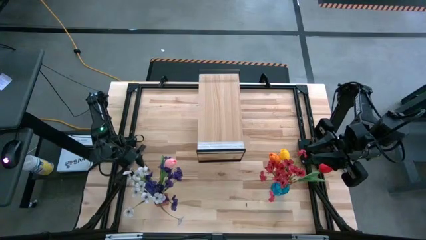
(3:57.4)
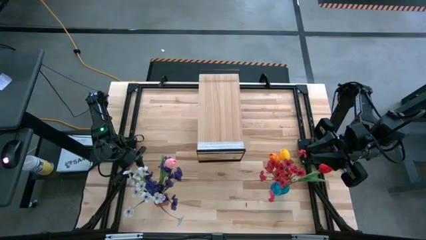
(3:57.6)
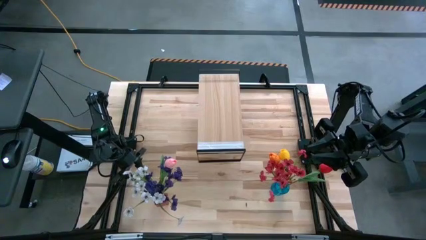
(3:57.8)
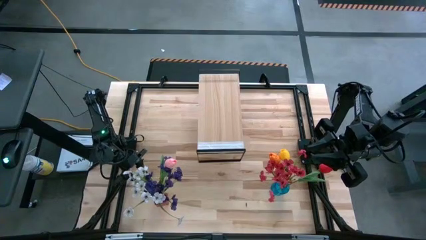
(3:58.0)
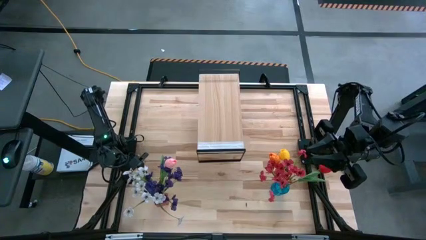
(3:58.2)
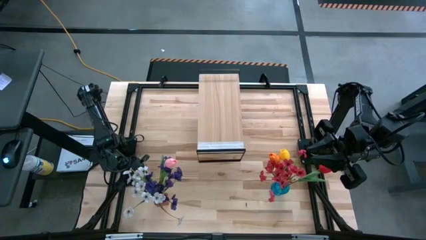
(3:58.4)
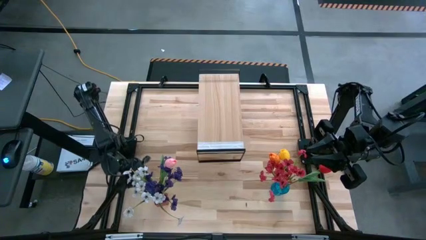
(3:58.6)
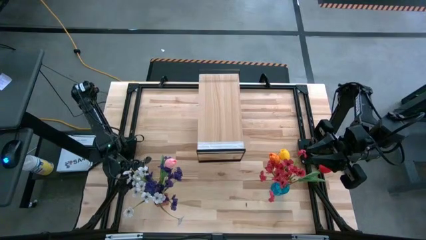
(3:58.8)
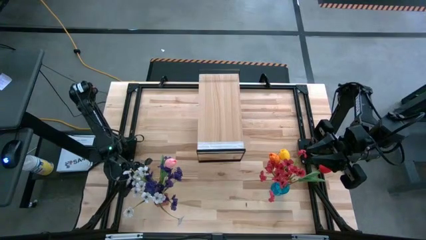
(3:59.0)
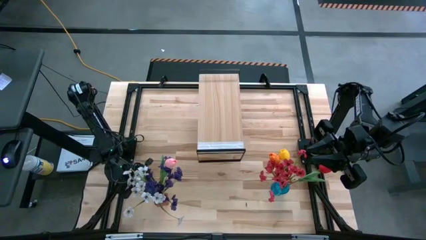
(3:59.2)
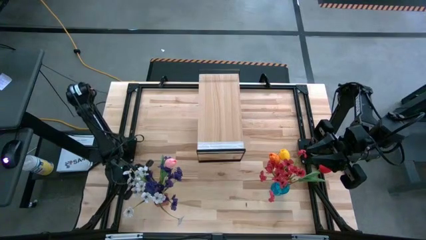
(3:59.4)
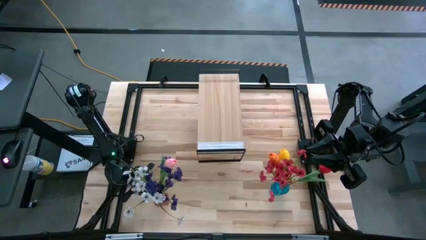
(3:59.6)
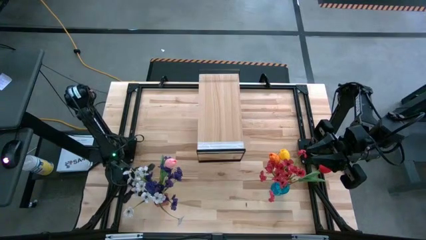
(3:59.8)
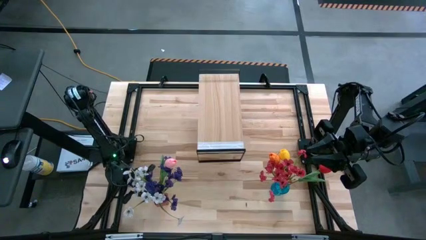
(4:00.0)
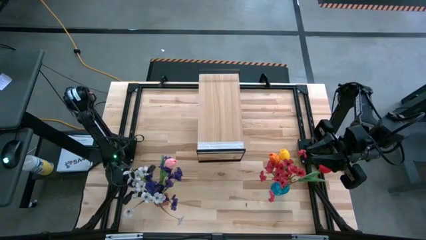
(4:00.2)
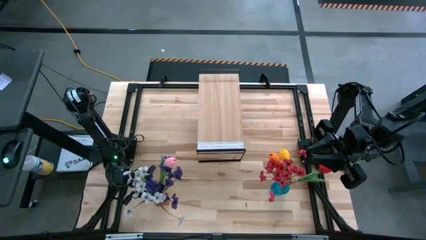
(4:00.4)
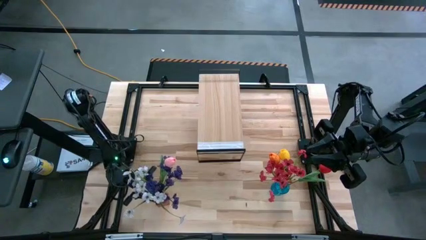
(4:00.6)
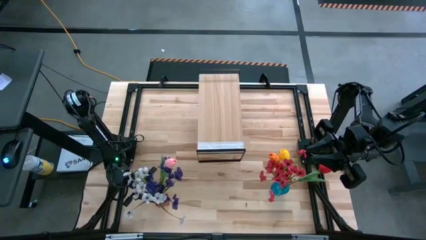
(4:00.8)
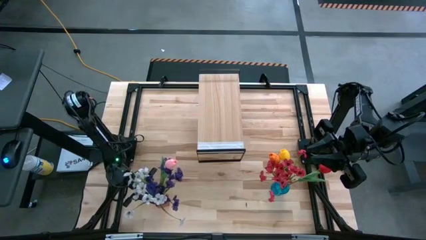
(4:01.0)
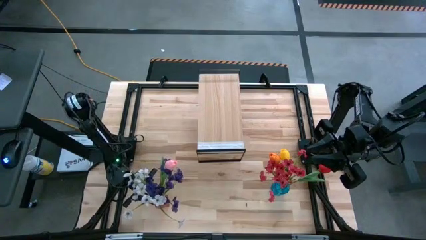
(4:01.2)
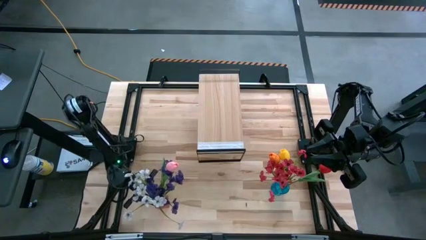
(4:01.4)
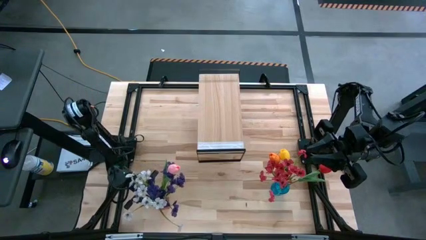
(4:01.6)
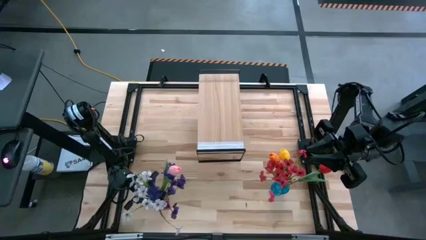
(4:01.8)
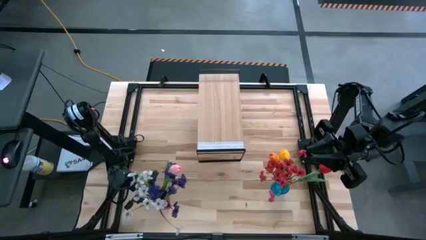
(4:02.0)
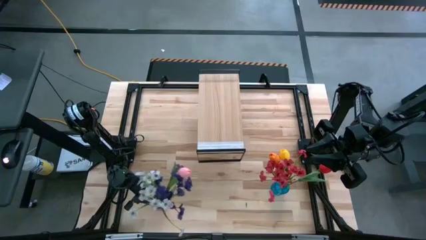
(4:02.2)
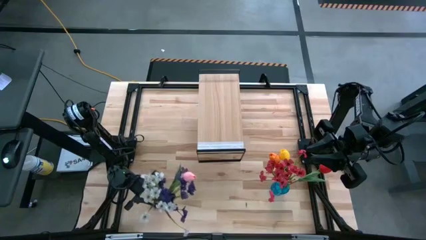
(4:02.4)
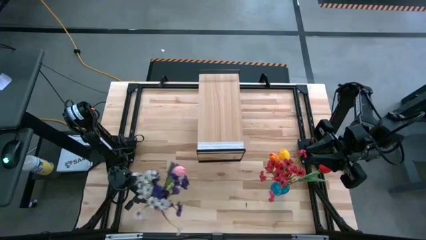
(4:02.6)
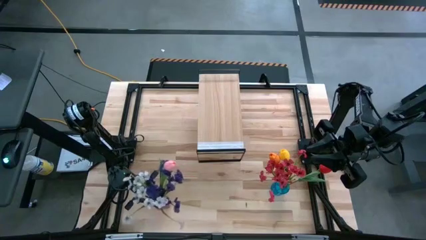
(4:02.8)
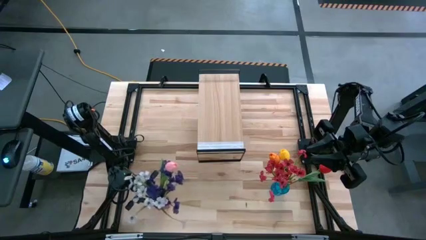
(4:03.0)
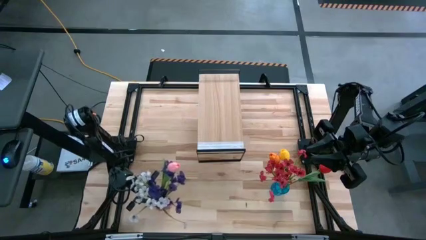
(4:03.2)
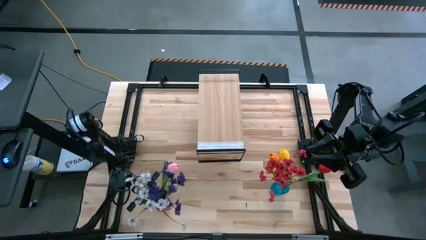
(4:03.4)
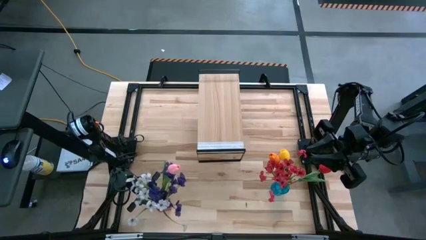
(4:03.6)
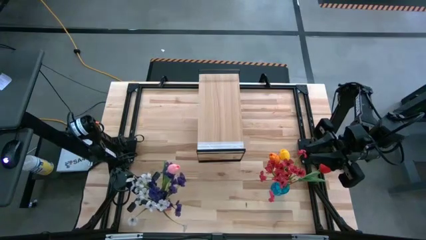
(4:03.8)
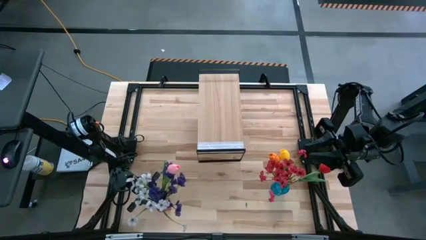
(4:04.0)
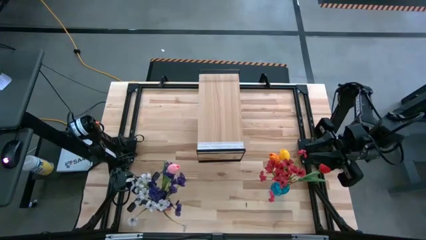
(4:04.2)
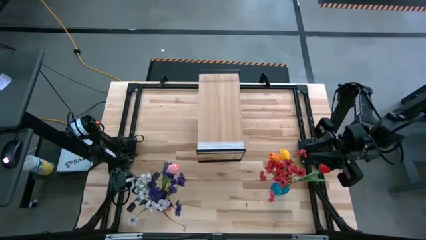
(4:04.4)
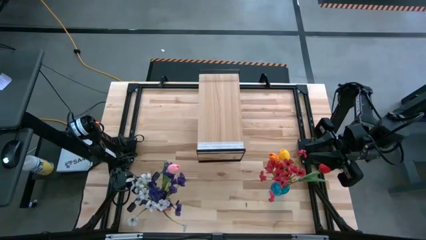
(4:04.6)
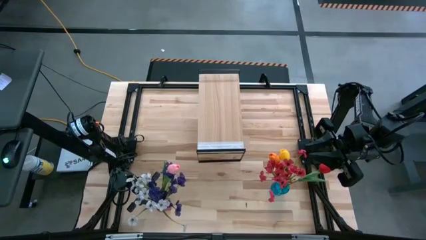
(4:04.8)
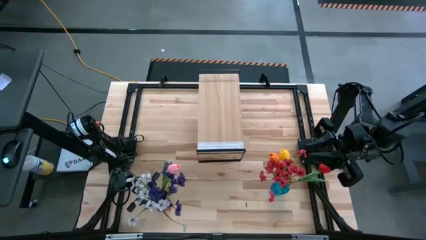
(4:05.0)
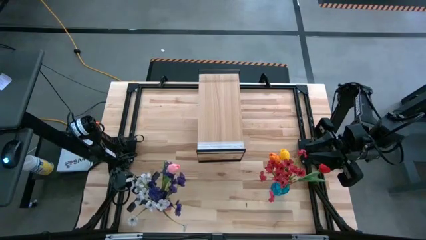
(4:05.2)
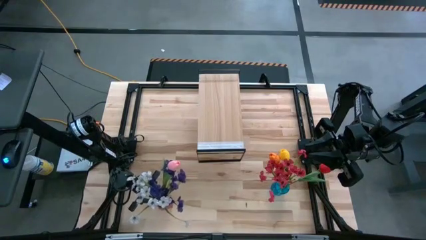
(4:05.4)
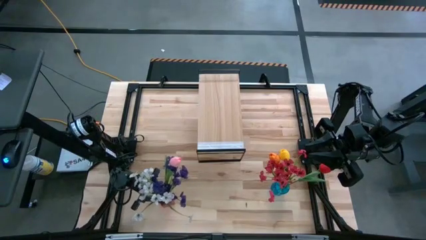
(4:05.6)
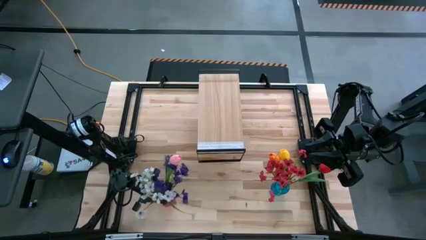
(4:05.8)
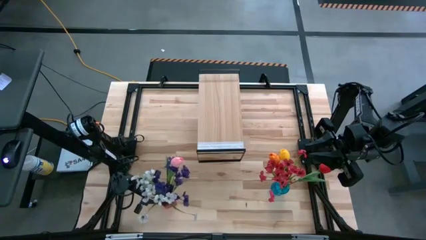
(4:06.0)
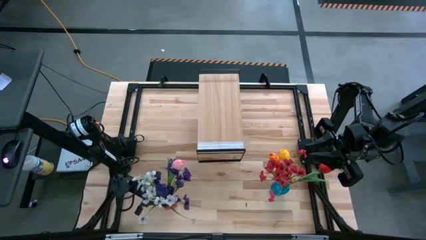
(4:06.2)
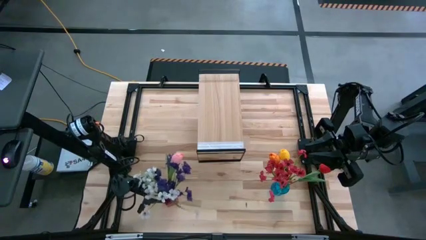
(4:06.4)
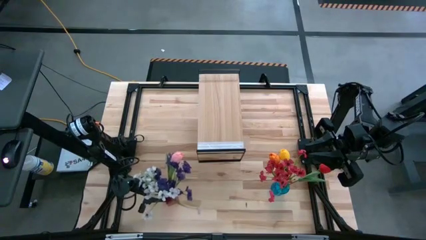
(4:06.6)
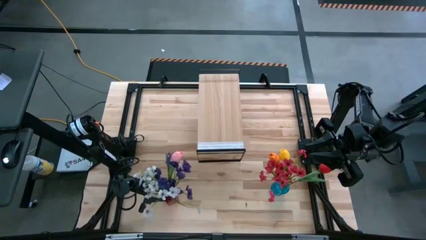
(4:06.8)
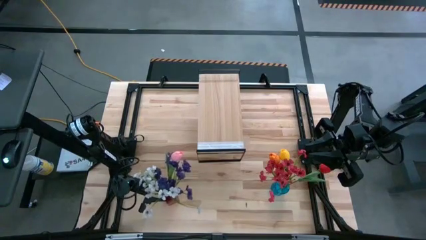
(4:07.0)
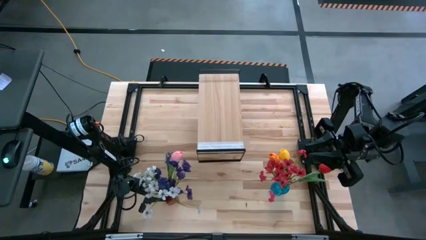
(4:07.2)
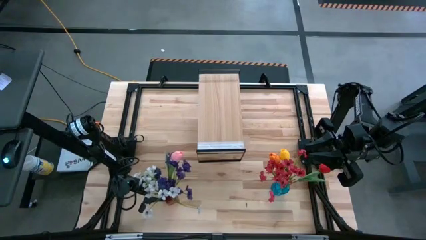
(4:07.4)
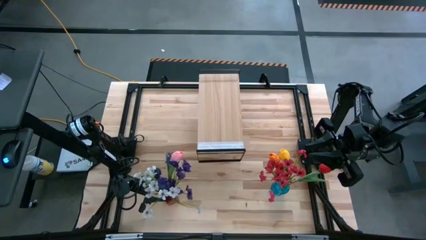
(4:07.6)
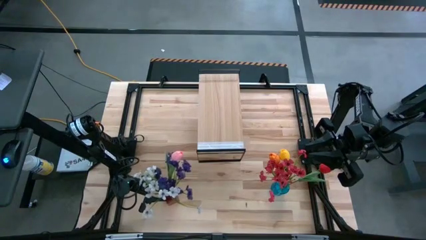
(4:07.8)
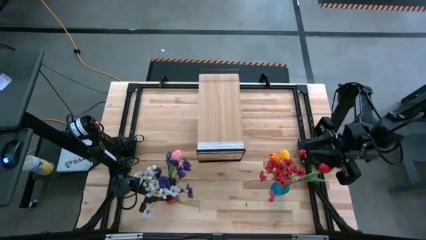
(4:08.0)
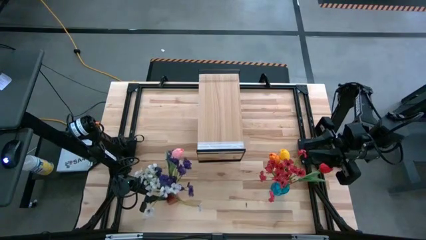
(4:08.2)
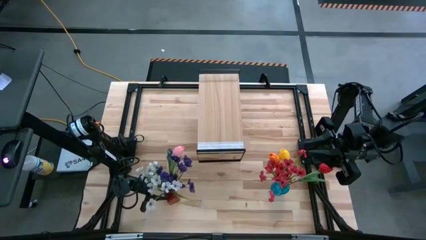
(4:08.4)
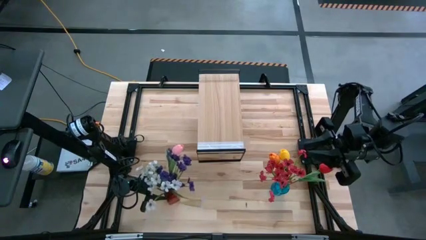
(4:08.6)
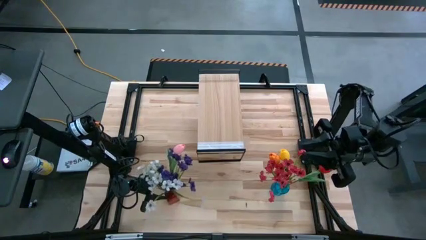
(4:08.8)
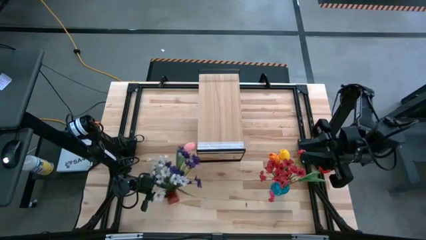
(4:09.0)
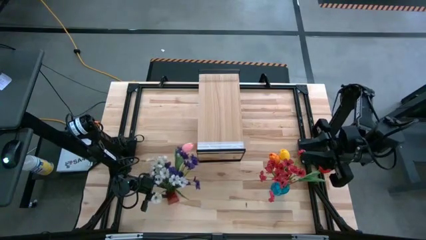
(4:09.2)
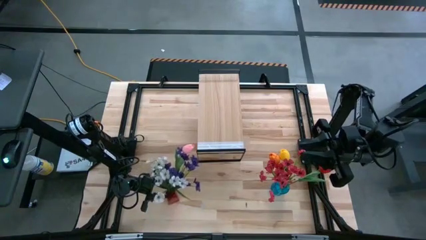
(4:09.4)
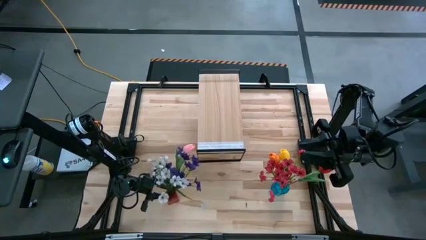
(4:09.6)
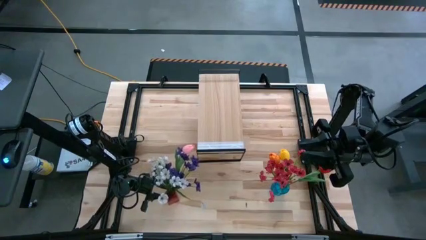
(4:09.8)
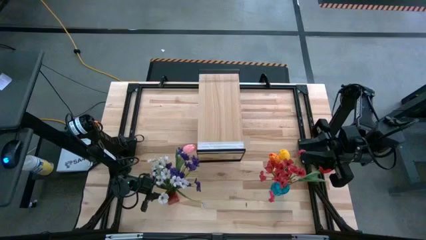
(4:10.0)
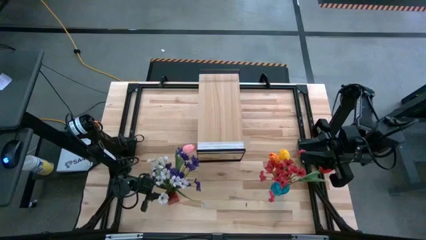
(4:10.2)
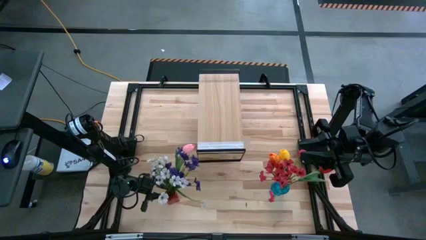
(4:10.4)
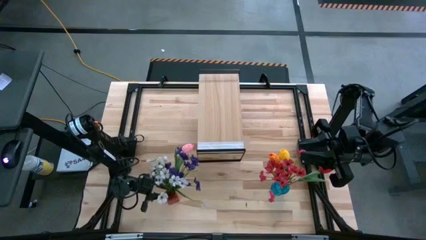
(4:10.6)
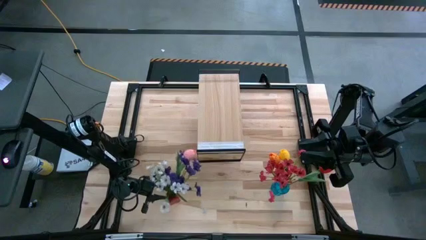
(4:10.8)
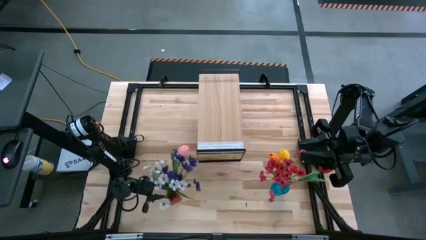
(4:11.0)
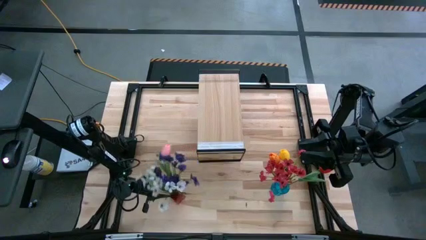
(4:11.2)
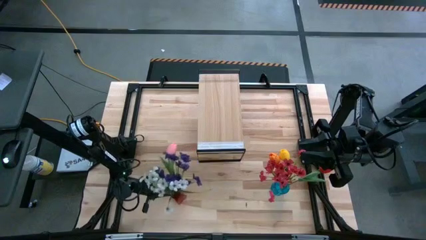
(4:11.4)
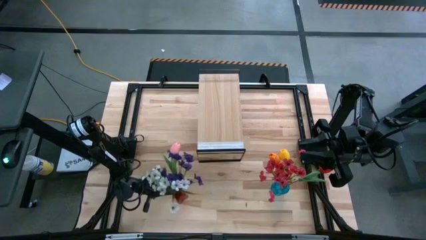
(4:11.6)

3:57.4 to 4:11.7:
Task: Pick and place flowers into a vace then onto a shelf
Put the red vase with flowers on the shelf
